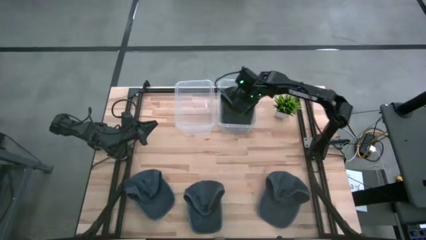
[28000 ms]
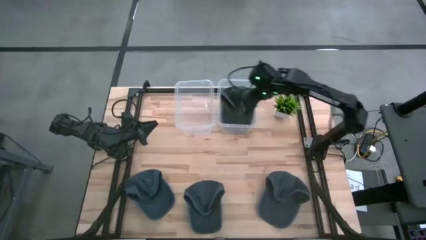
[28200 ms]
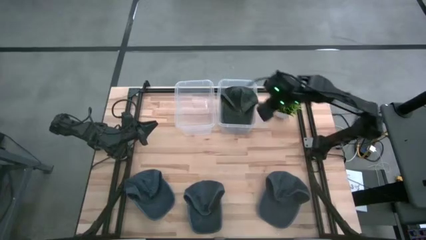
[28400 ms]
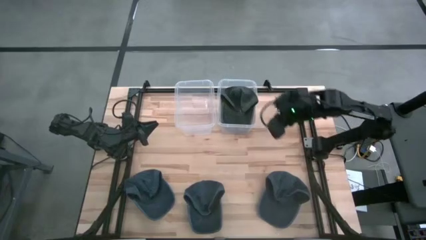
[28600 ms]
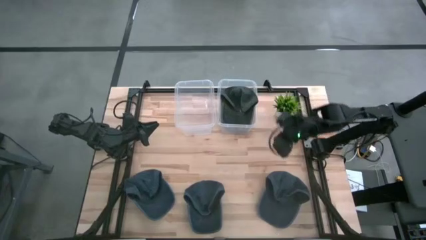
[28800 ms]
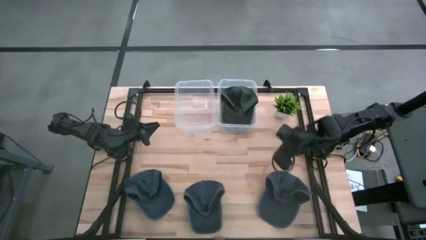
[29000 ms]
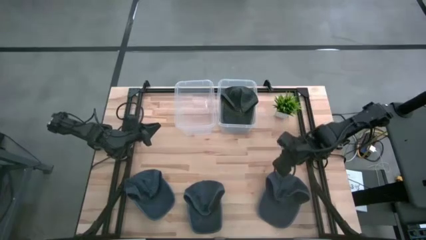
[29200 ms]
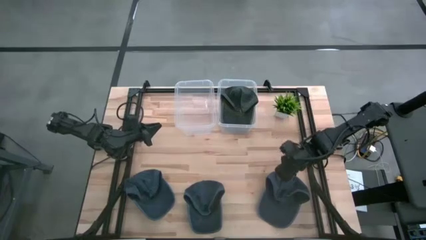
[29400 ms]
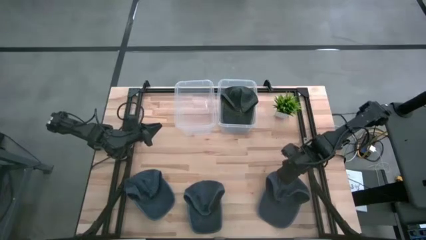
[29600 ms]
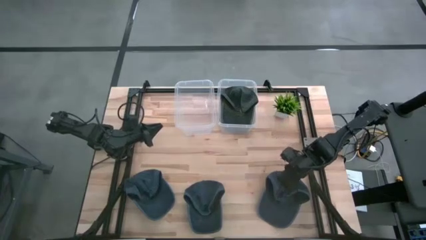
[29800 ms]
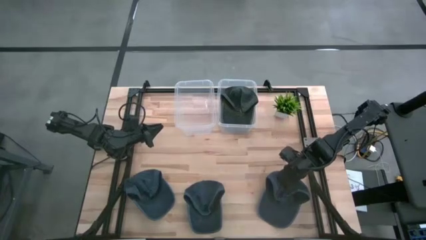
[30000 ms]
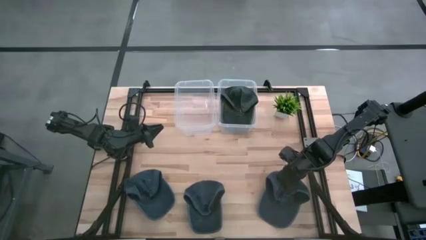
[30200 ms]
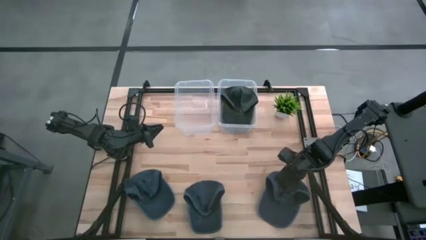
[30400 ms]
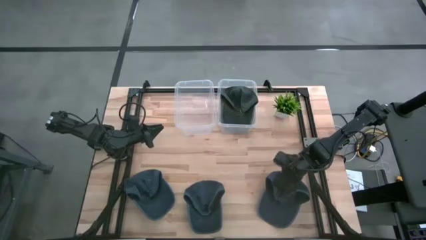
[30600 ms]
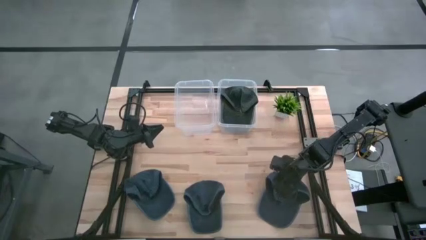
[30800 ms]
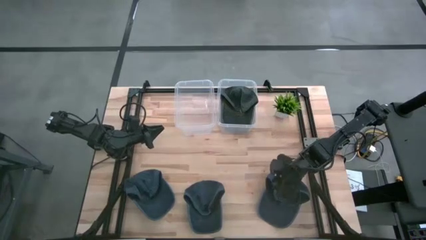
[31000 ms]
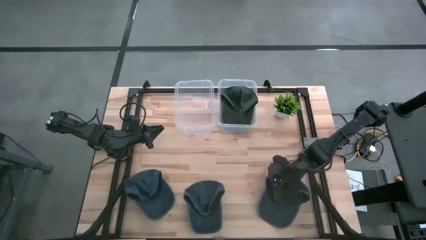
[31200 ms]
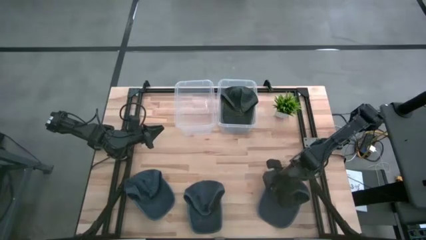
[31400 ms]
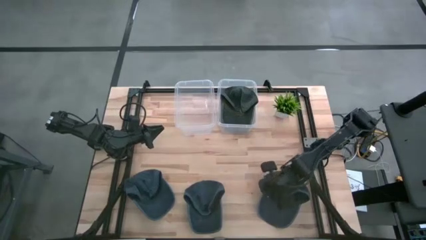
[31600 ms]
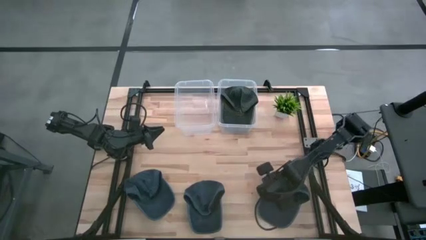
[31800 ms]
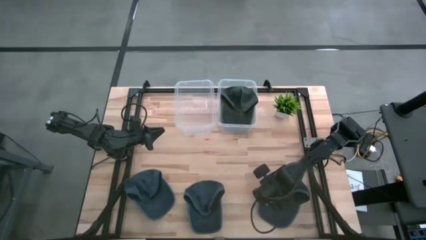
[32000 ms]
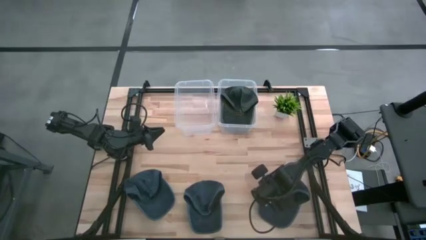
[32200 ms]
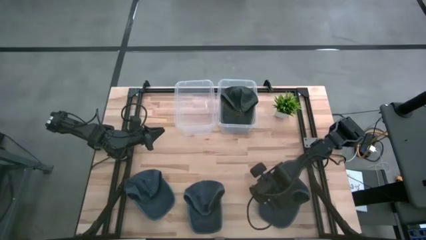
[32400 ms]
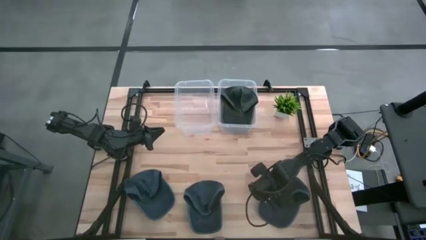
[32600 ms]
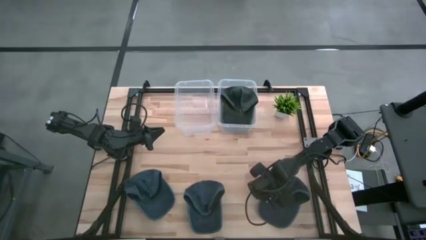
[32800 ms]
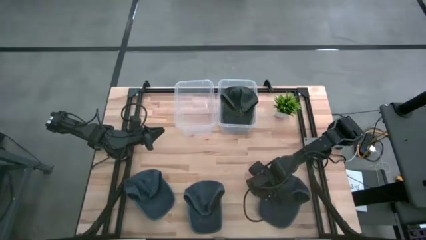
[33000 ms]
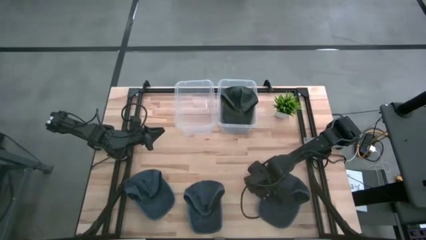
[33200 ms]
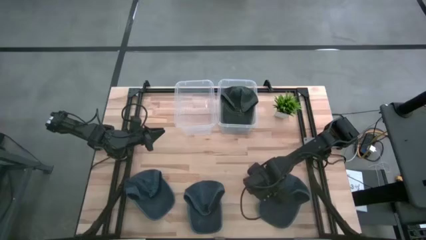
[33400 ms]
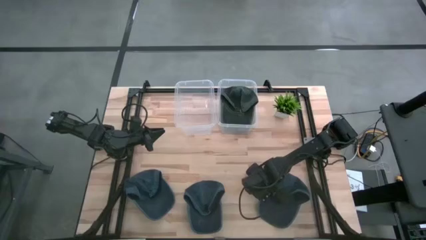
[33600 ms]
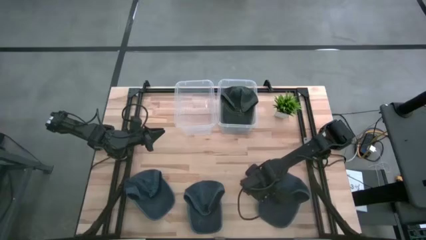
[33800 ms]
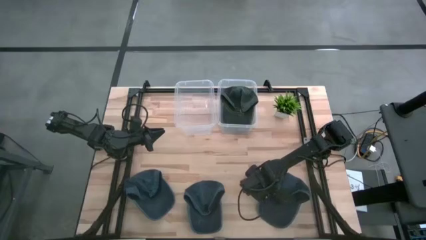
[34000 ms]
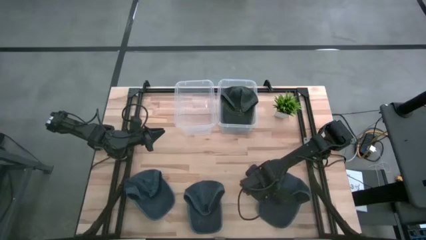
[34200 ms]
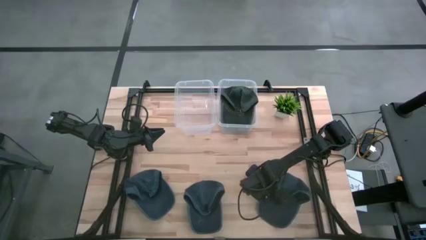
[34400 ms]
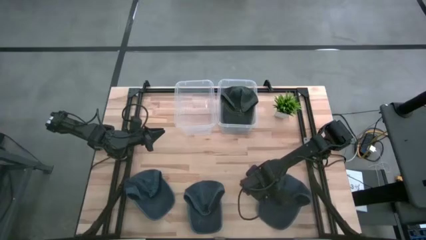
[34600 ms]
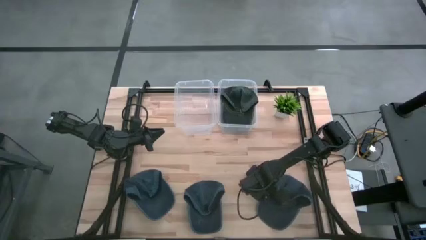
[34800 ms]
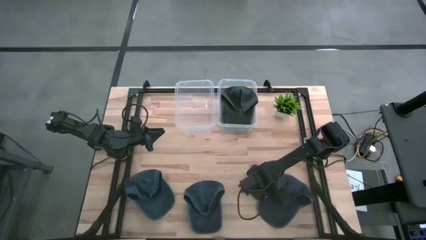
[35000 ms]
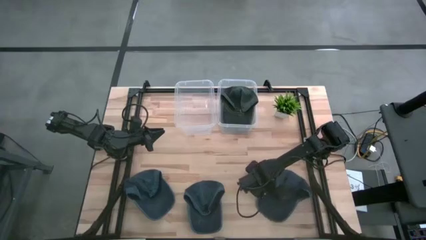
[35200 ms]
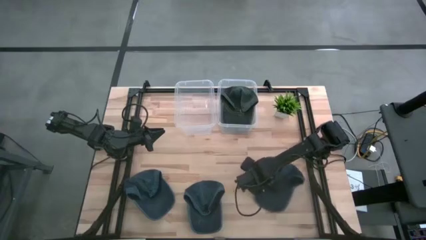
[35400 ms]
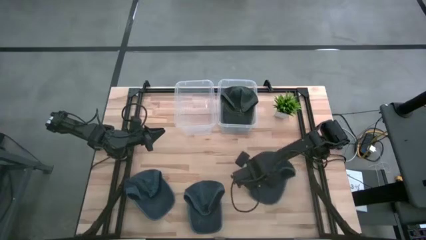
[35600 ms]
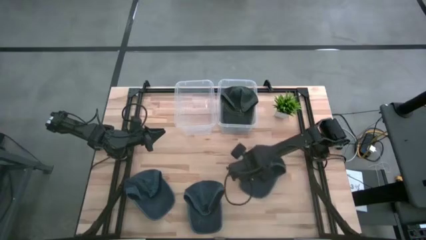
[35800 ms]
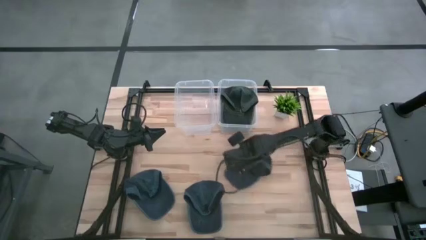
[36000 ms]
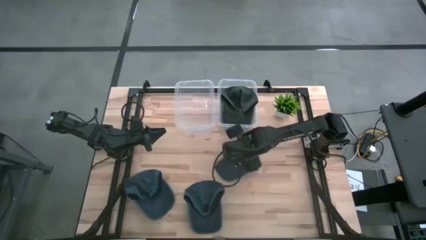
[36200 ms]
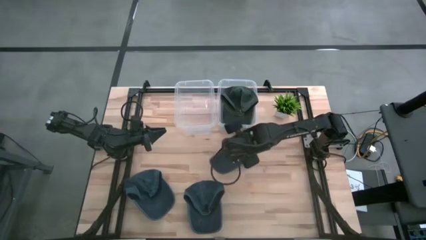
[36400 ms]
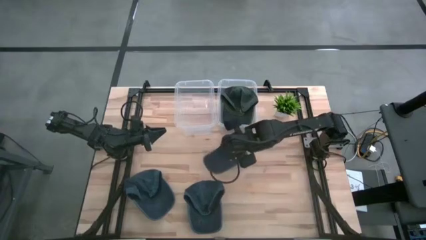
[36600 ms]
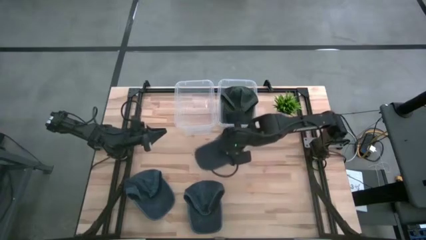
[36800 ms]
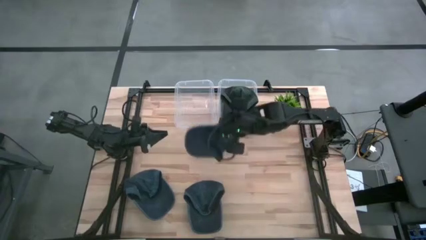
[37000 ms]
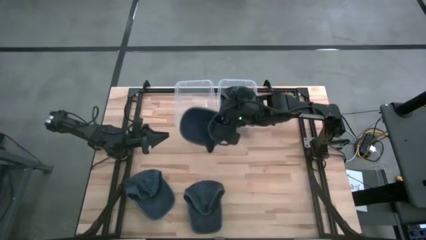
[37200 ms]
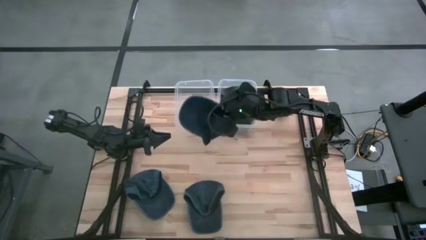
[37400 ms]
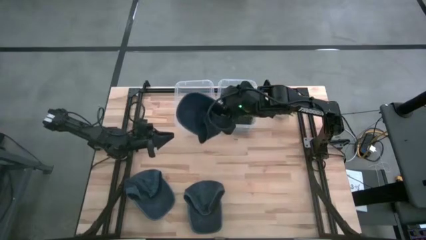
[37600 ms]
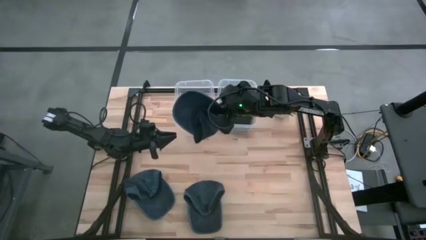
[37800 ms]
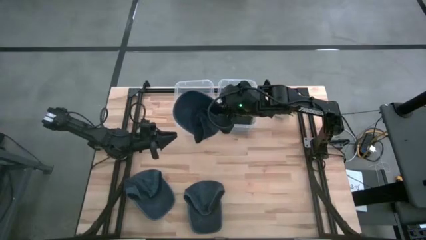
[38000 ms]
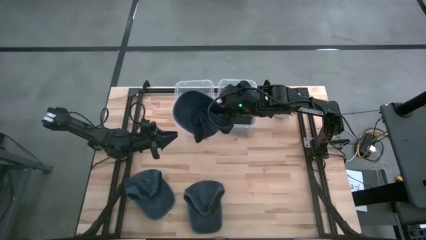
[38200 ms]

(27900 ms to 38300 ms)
Task: Pick & Place hat
Put the right blue cap into the left transparent bin

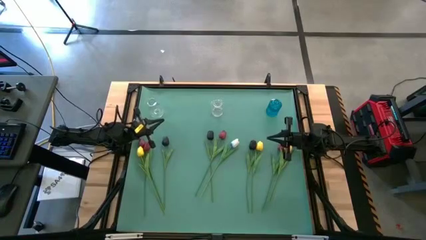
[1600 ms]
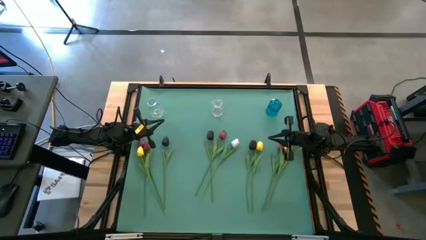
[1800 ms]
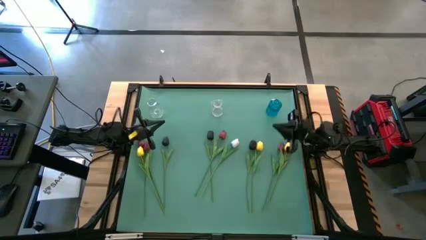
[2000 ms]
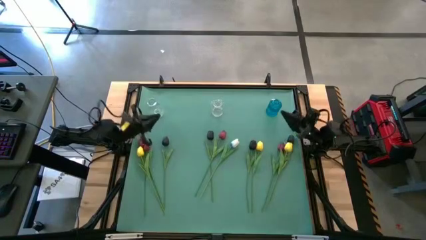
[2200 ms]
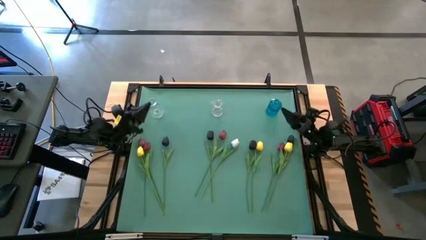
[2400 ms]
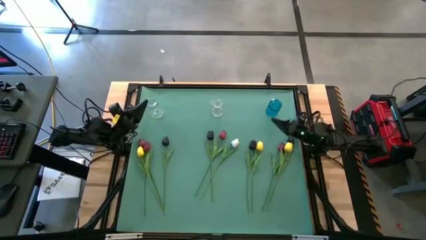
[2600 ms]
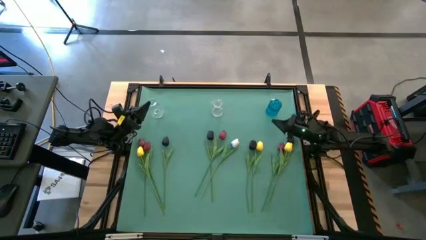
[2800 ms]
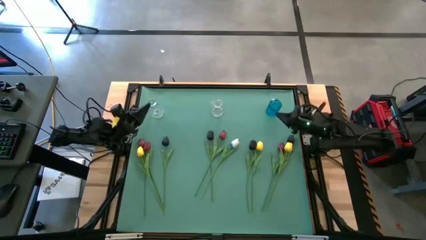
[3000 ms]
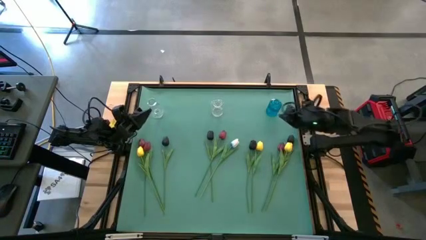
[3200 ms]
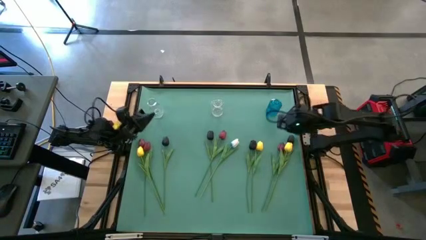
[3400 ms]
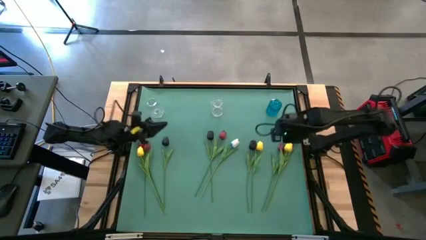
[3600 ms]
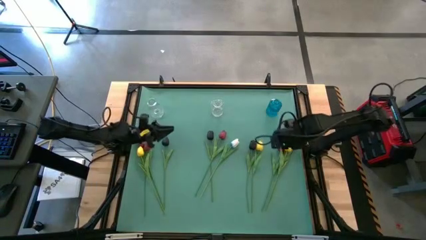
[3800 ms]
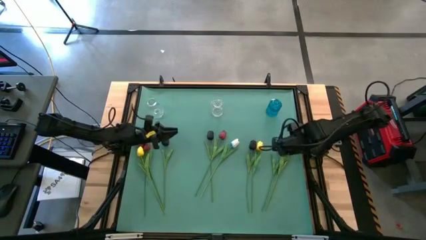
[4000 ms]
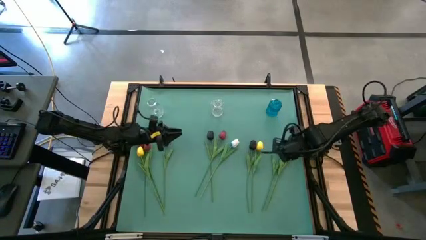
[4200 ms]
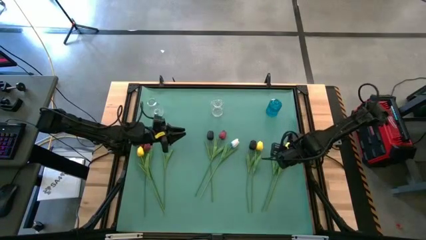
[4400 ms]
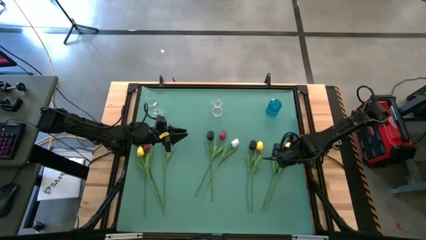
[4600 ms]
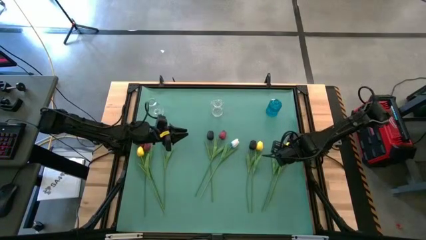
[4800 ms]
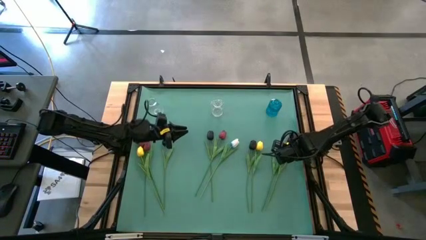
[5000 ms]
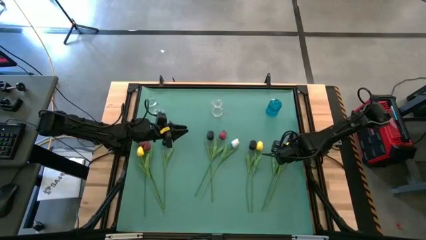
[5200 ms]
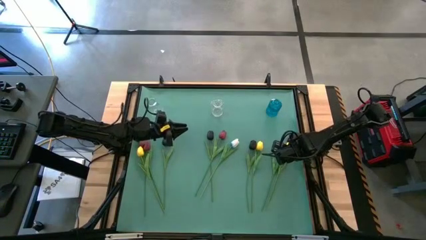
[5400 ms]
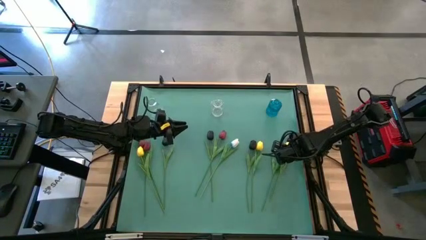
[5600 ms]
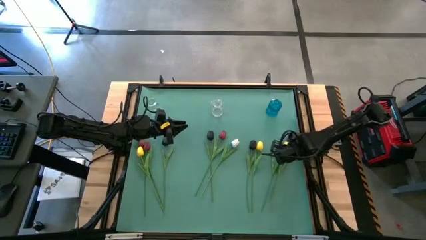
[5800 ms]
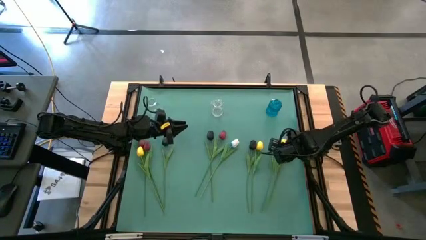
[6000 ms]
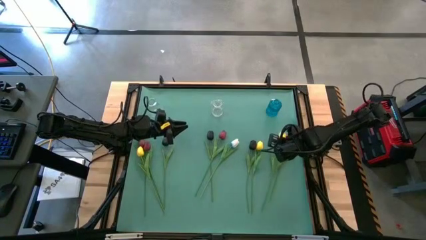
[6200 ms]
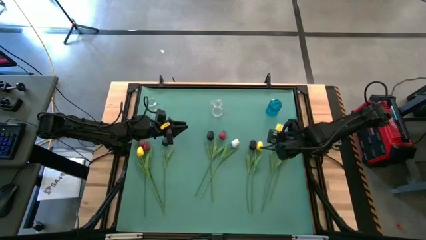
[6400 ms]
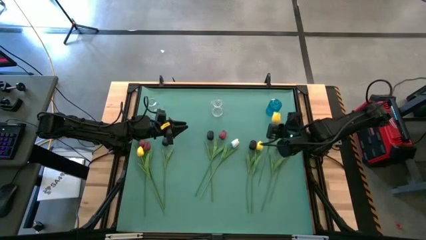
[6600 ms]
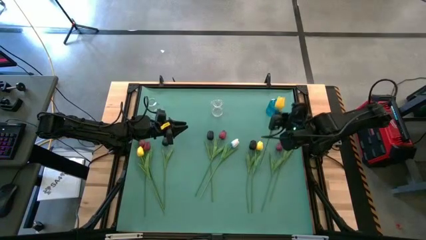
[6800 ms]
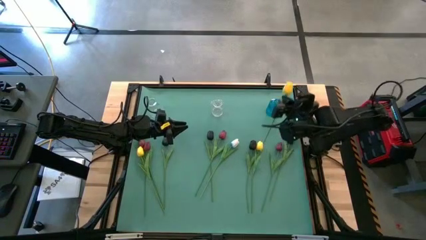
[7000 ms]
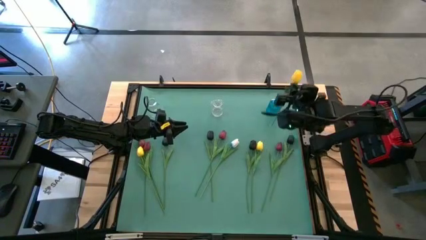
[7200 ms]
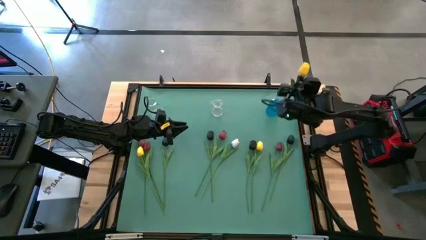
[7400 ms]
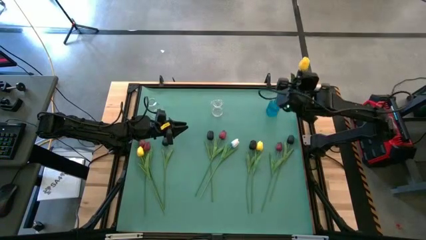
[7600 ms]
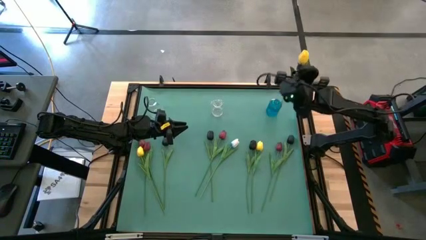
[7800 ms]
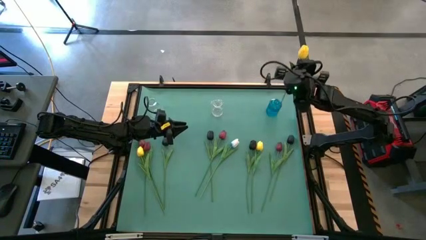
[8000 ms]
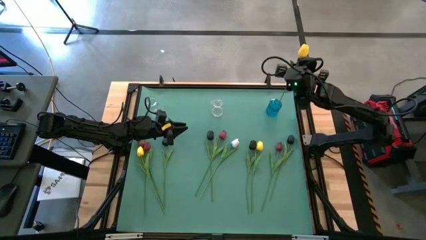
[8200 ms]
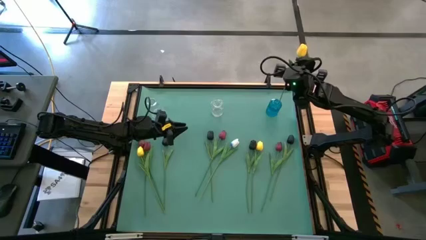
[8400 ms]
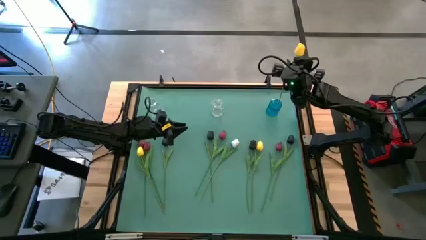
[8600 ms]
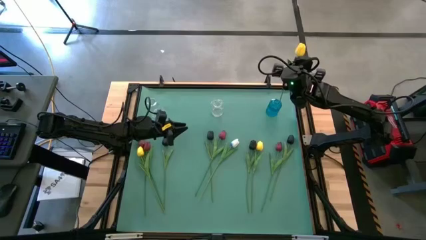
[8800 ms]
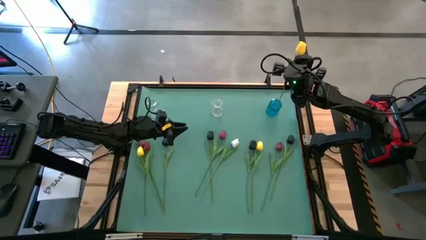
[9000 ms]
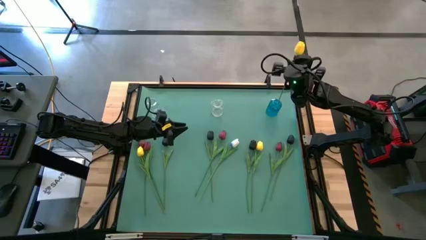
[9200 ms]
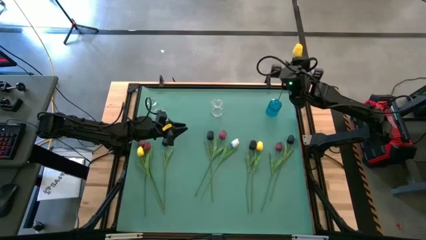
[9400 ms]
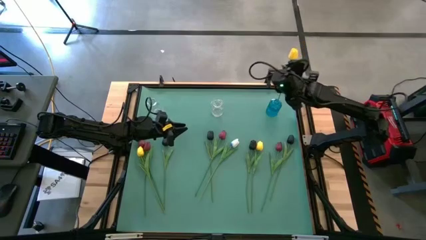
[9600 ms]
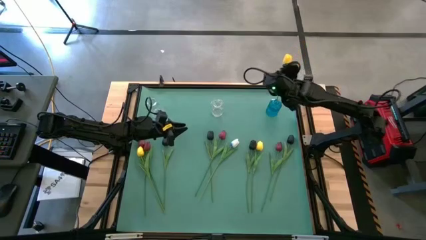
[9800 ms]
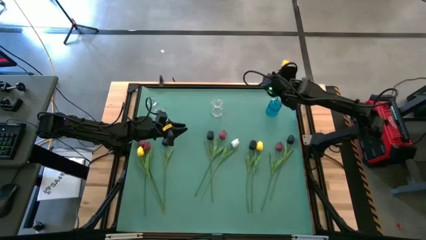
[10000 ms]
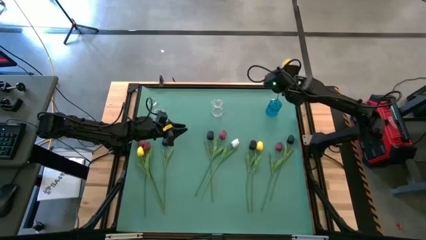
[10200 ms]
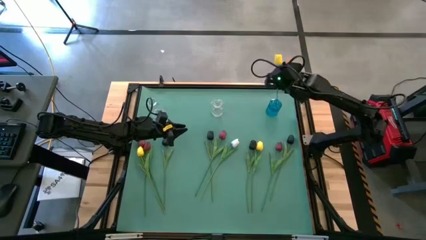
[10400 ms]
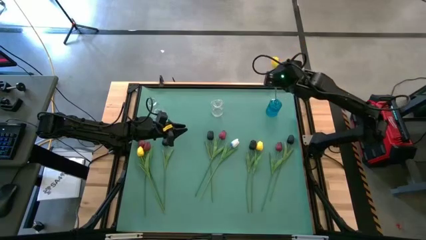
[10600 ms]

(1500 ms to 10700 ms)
Task: Sort flowers into vase by color
Put the yellow tulip into the blue vase
